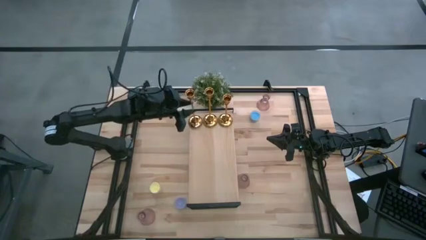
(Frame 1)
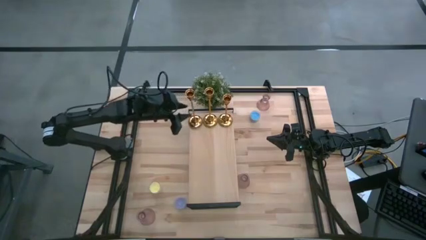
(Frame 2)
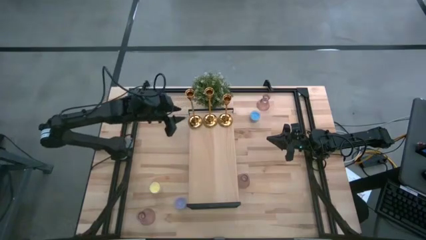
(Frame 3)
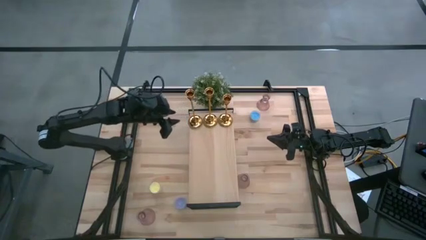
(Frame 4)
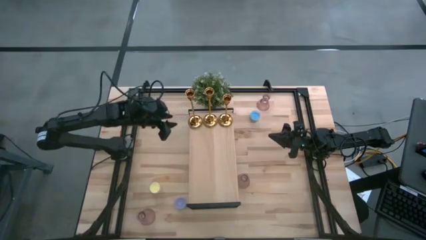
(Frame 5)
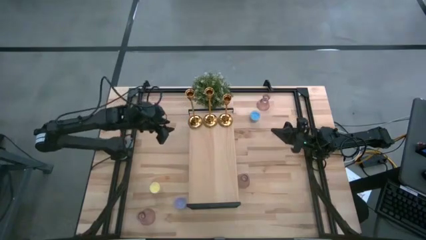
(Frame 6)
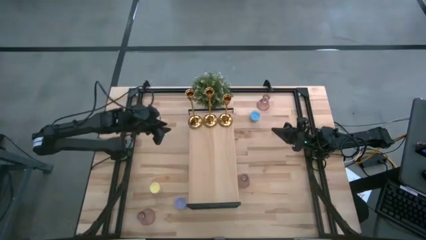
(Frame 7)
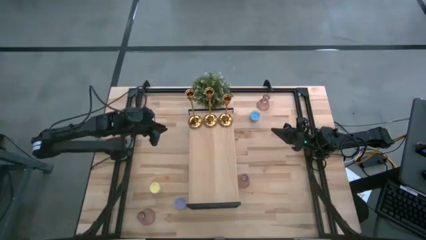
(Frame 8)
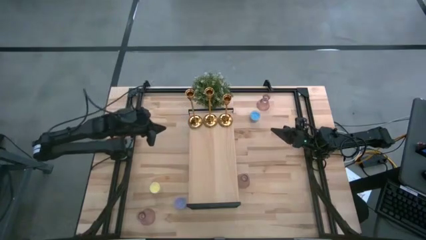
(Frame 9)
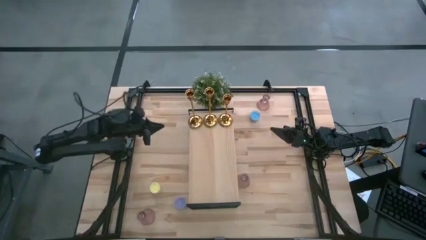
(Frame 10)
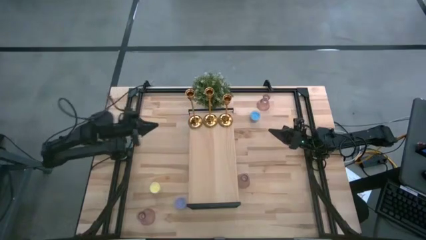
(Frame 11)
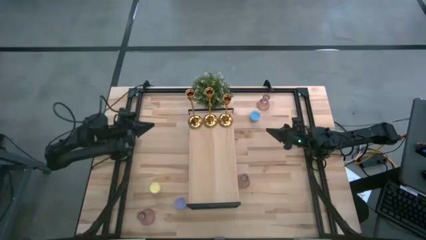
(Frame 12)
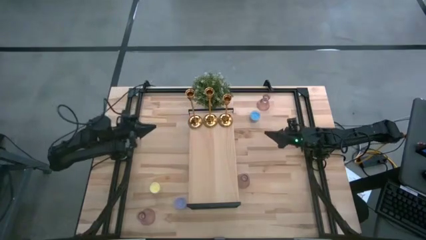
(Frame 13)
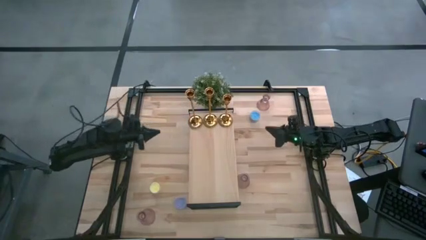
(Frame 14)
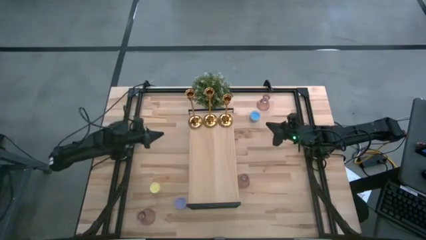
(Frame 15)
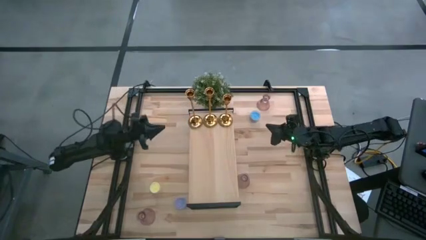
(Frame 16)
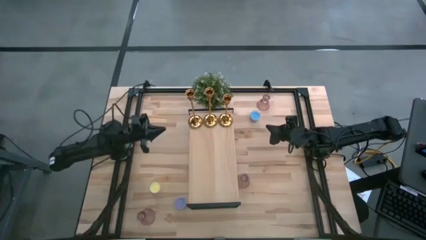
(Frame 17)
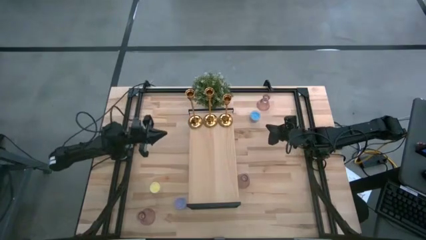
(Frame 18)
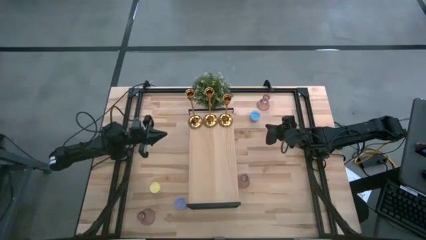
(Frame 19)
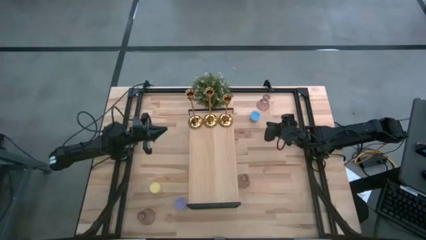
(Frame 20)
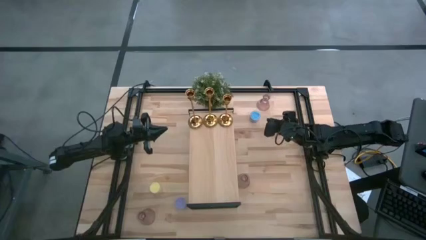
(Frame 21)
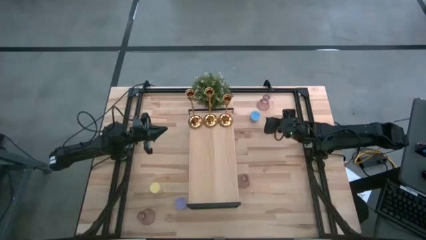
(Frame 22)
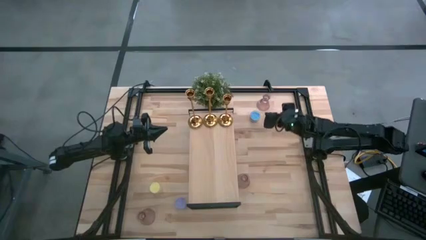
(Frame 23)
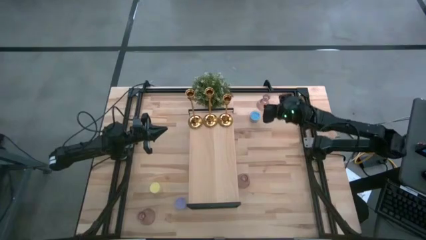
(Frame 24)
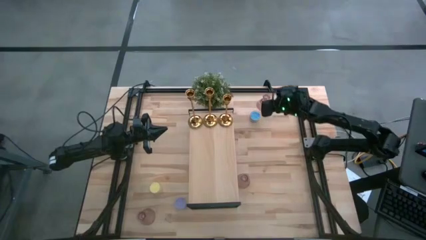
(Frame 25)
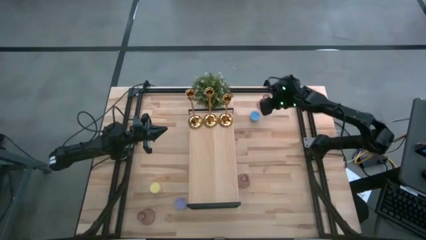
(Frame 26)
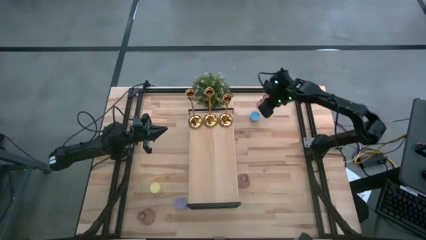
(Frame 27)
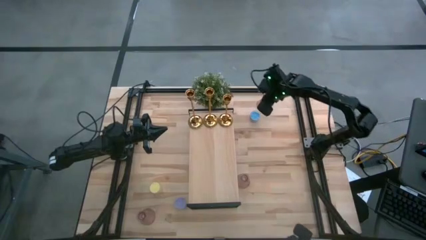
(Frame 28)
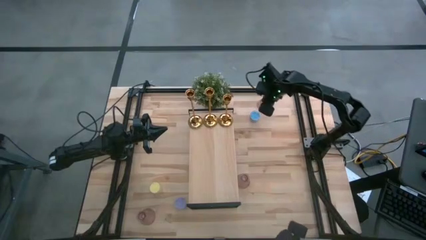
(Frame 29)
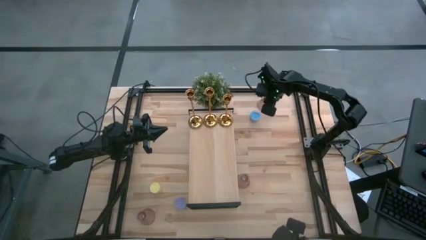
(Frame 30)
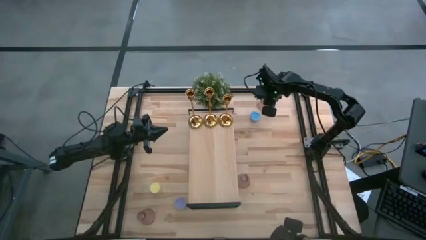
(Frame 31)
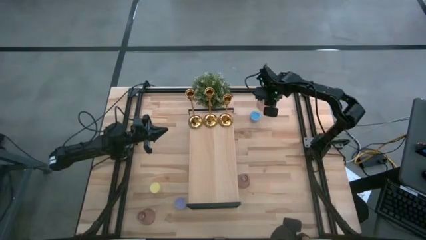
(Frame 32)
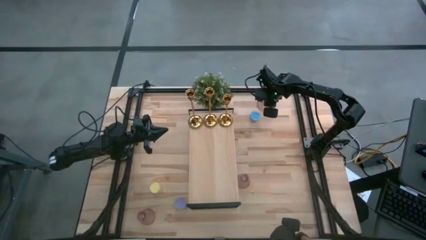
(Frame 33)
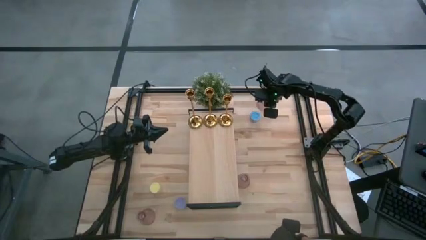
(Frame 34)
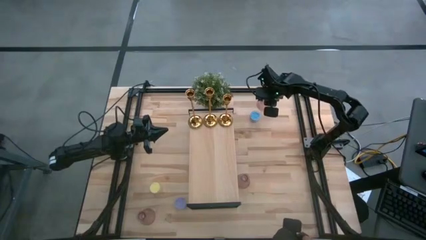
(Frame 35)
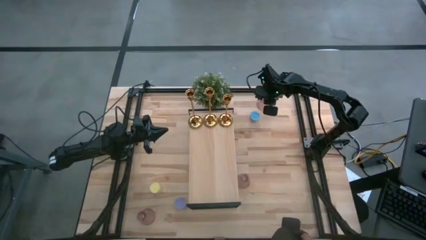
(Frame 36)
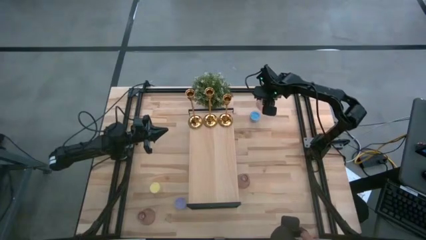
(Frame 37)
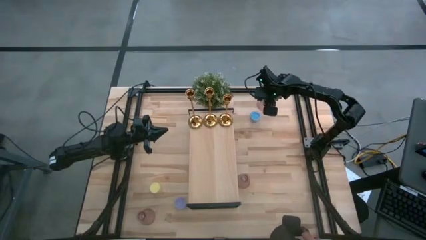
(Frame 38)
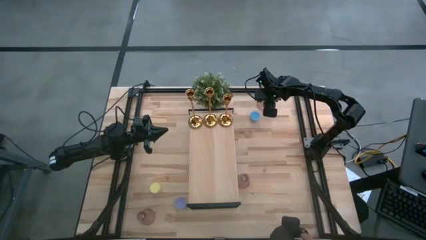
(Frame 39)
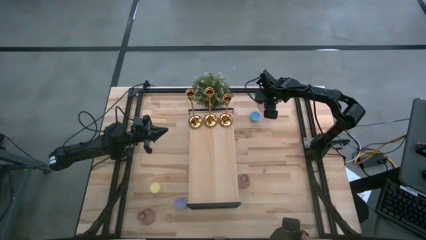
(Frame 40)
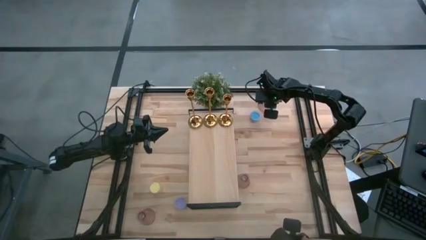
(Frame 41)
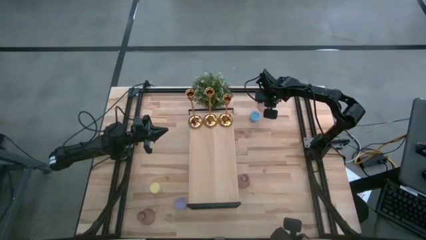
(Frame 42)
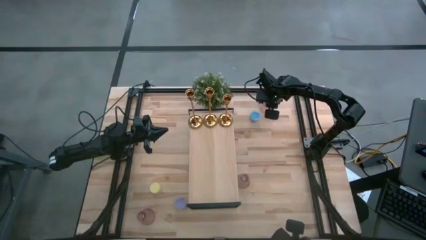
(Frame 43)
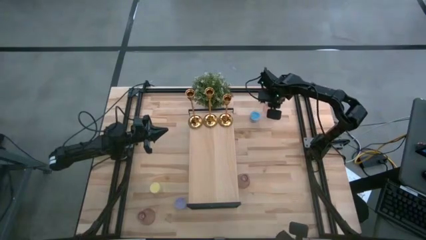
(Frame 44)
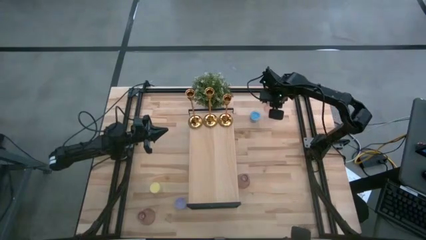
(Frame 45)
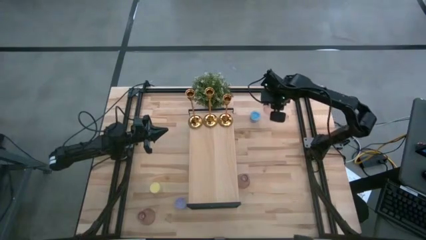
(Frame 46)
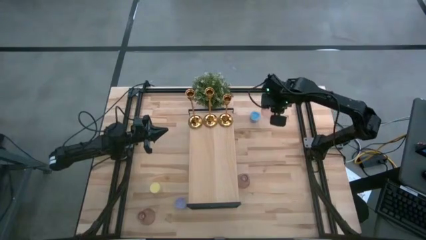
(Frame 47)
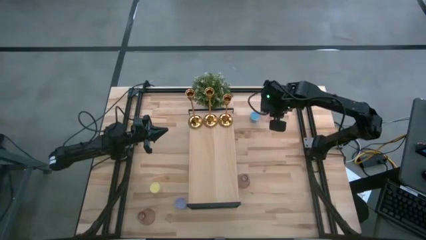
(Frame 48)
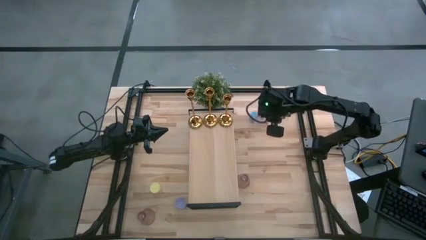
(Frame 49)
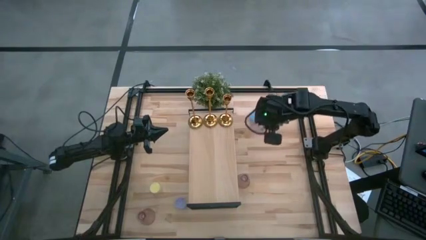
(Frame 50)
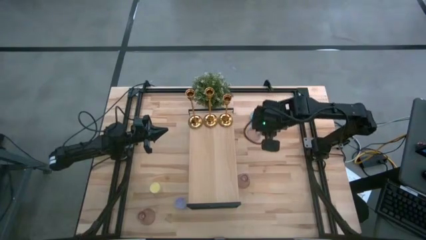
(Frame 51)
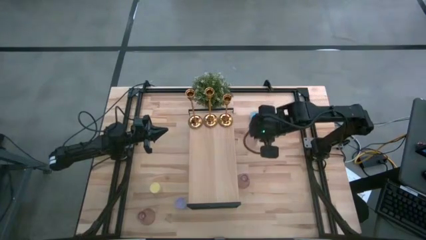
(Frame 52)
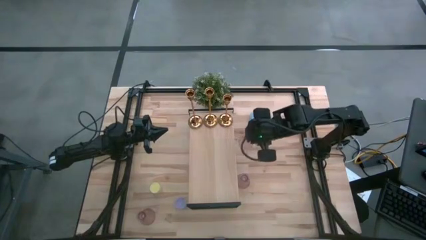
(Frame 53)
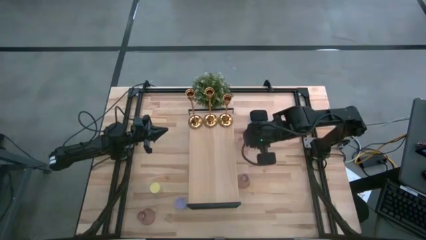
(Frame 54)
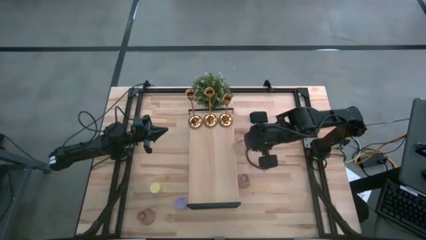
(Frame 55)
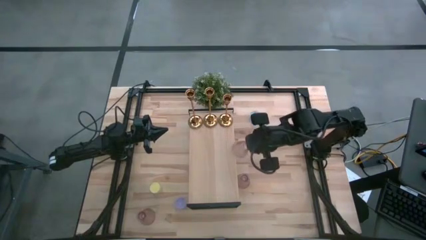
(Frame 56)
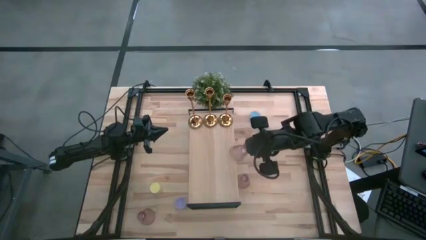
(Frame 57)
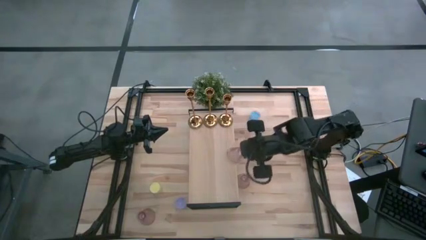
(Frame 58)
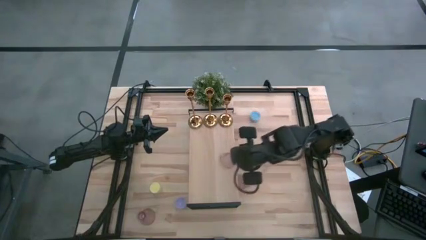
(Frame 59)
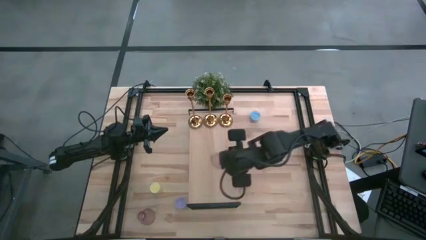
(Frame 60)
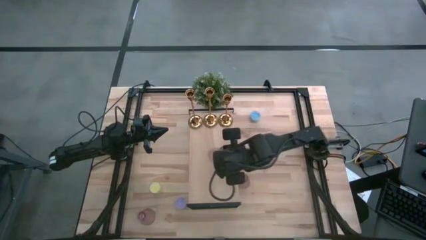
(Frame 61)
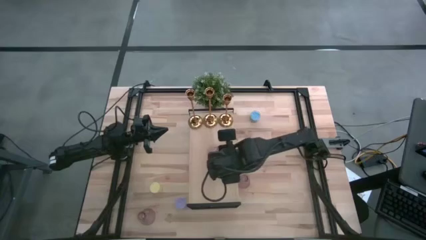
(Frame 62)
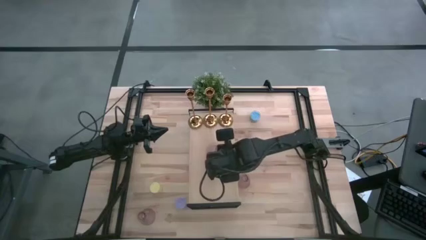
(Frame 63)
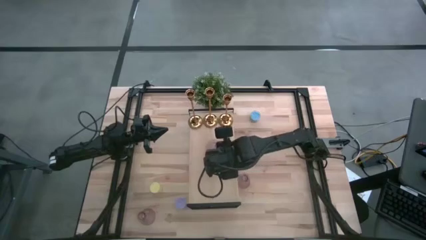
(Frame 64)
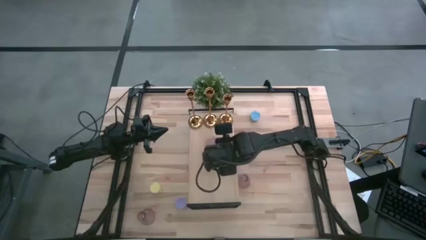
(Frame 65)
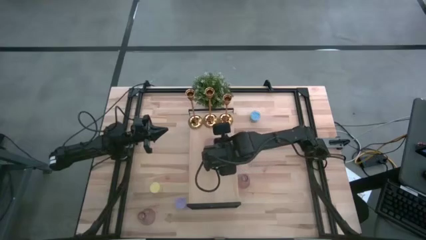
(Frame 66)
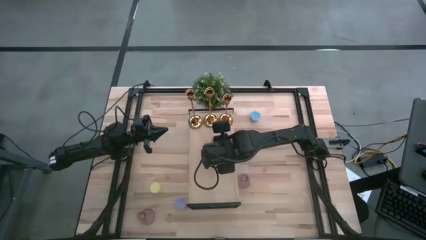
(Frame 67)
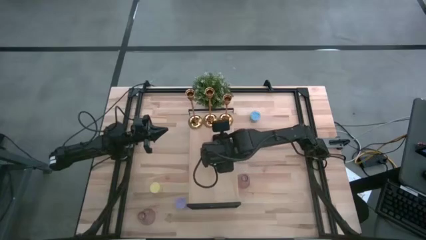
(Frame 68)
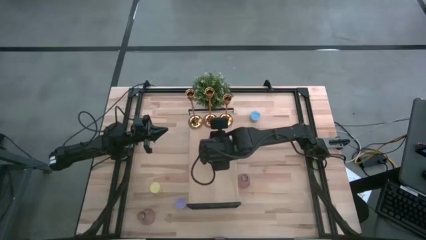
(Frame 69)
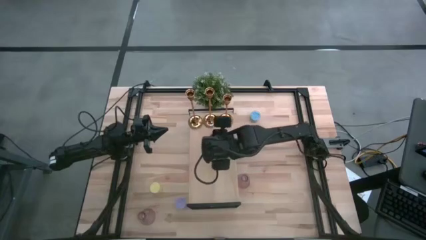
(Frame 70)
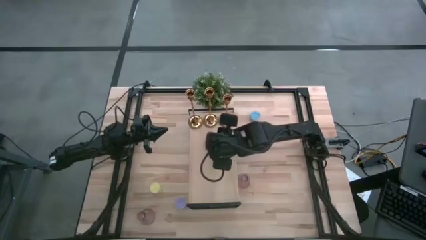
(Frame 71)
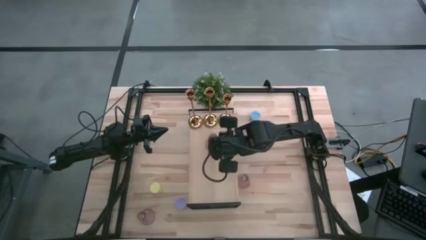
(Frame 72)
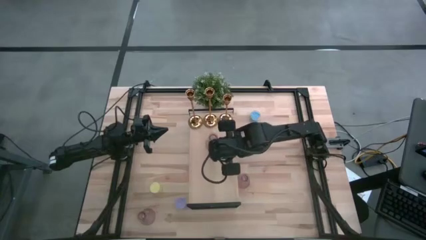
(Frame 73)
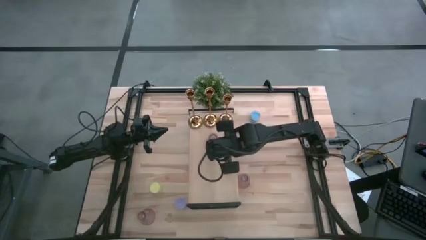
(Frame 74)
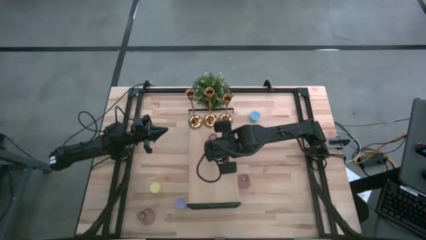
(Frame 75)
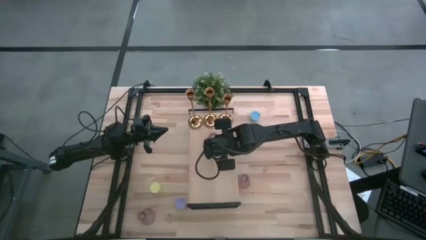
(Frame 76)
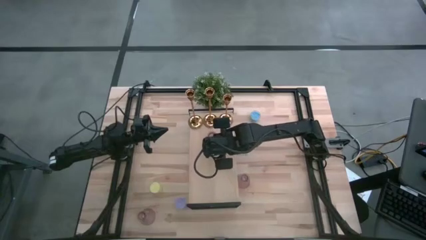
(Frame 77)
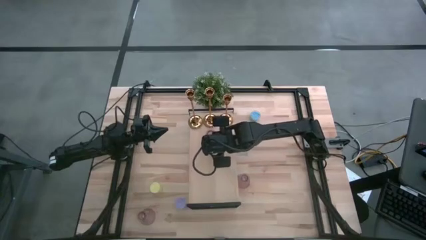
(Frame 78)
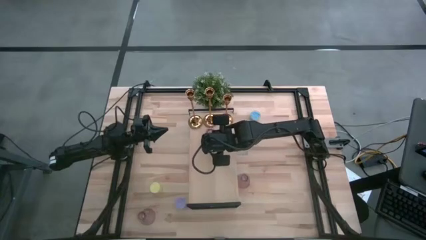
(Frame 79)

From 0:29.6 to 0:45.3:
Task: Pick & Place candle stick holders
Put the top pink glass candle holder on the shelf
